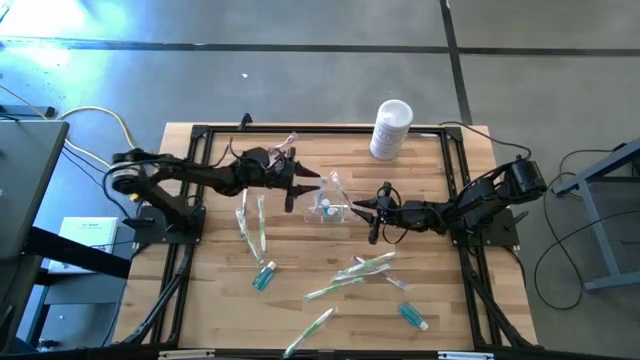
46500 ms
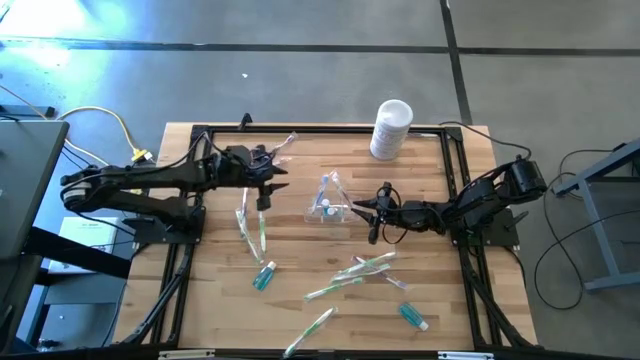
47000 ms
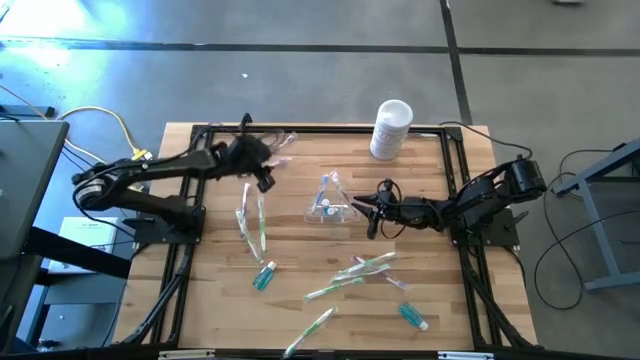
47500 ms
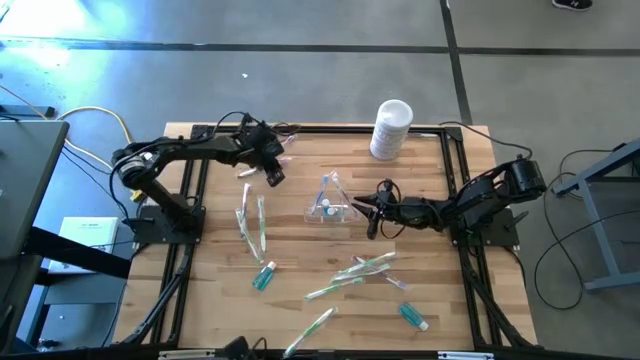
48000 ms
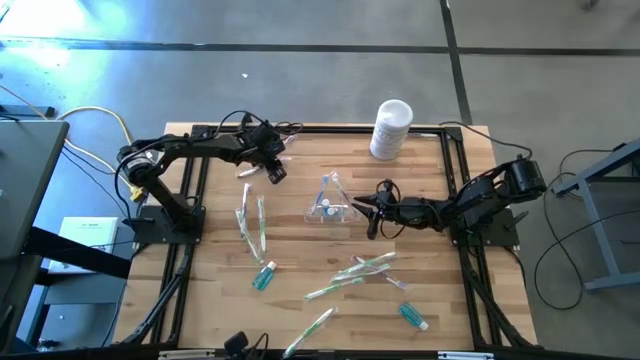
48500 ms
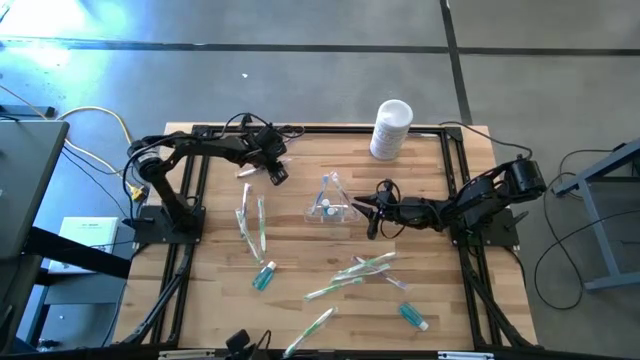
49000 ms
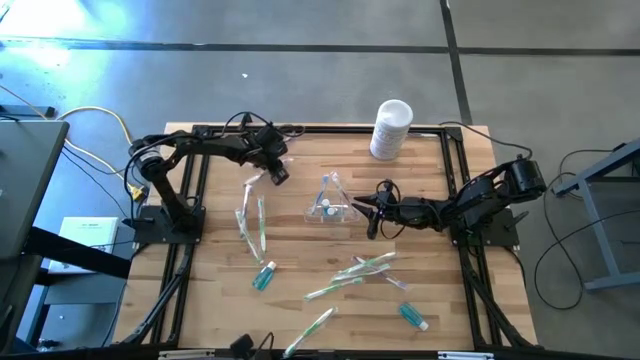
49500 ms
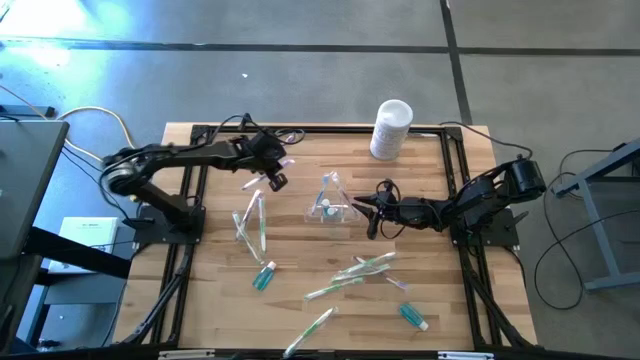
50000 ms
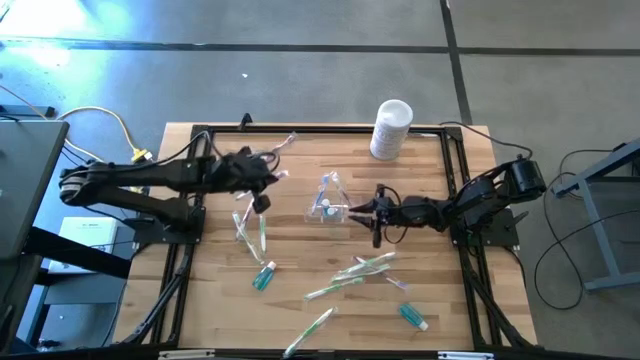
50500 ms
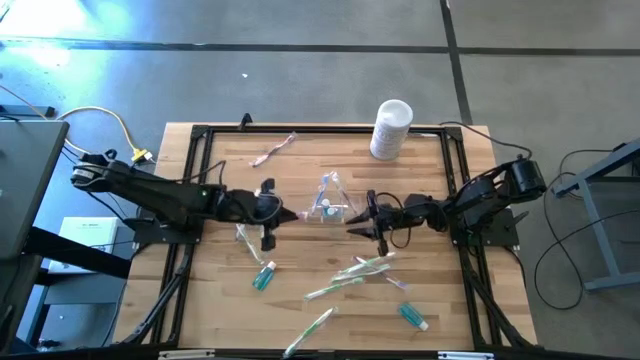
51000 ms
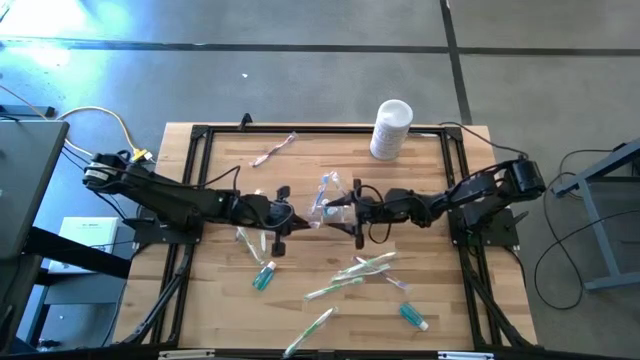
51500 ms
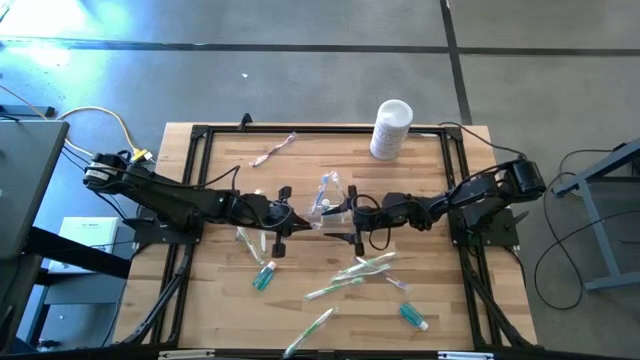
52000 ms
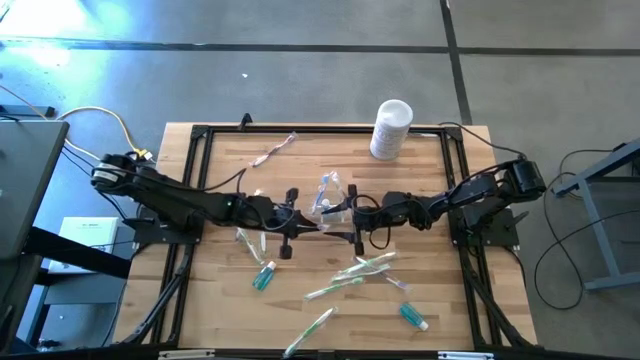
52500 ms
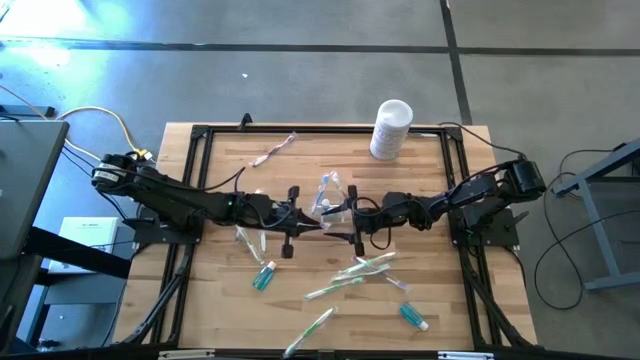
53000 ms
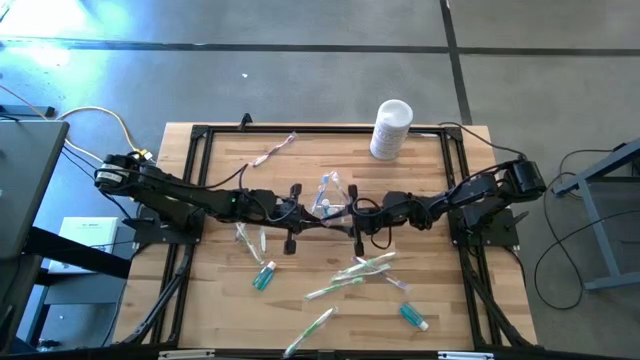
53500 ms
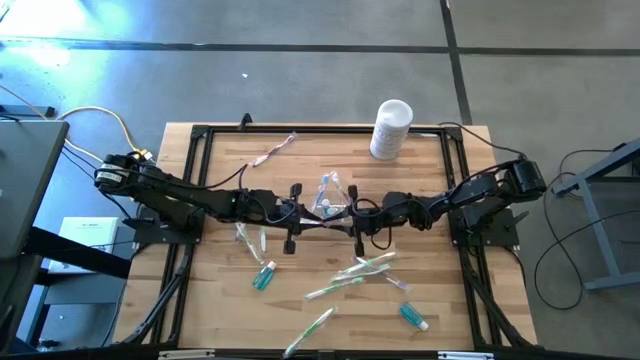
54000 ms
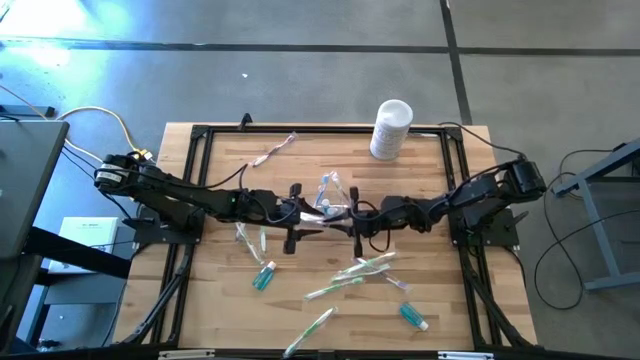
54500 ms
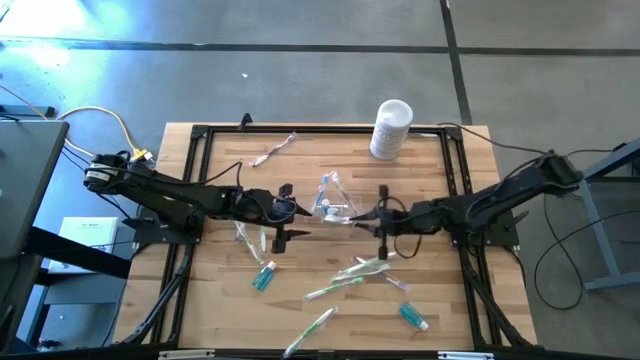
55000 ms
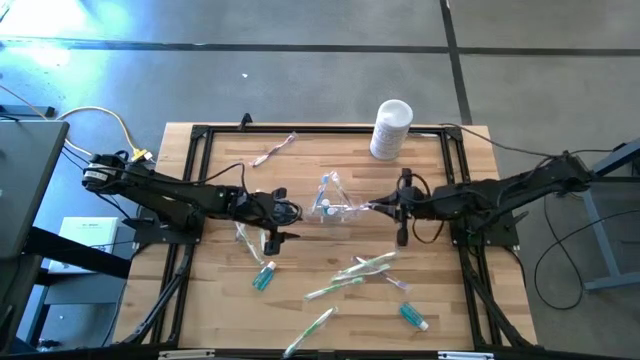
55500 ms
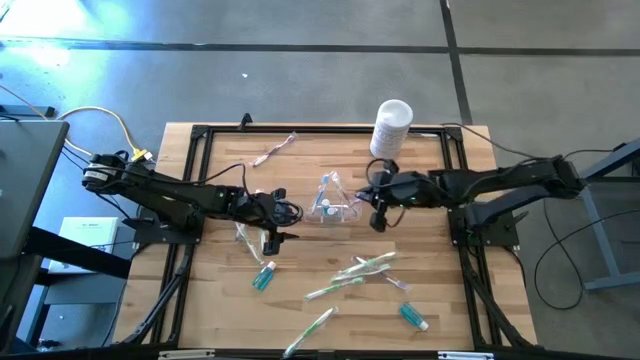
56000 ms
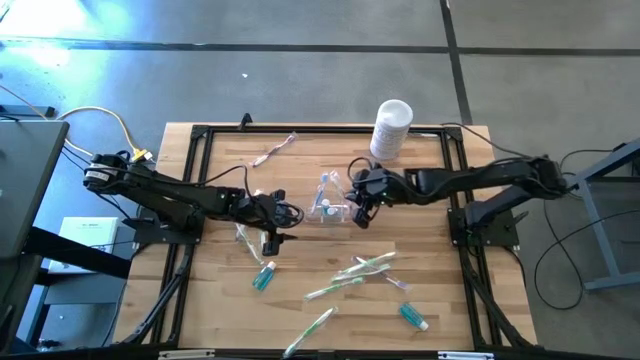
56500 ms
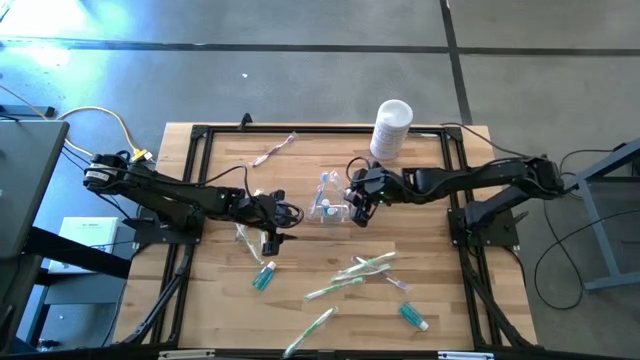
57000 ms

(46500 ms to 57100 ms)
Task: Pick & Place toothbrushing station
Put the violet toothbrush into the transparent organizer

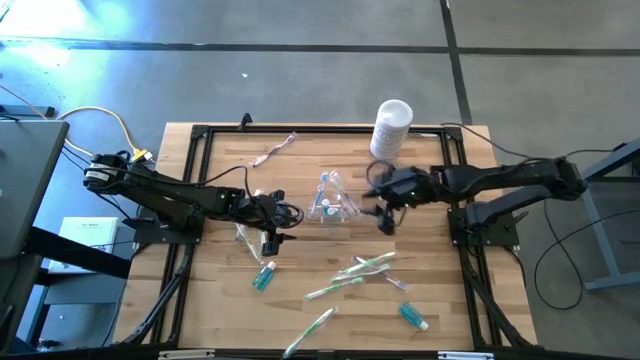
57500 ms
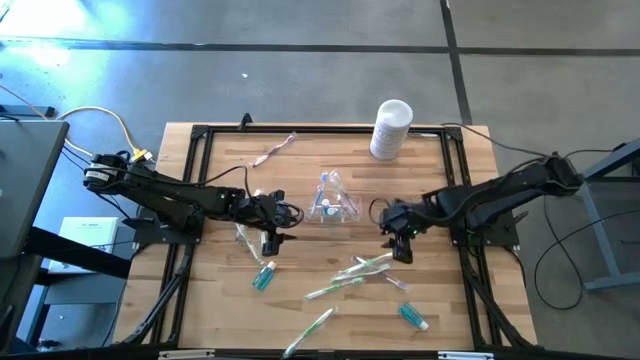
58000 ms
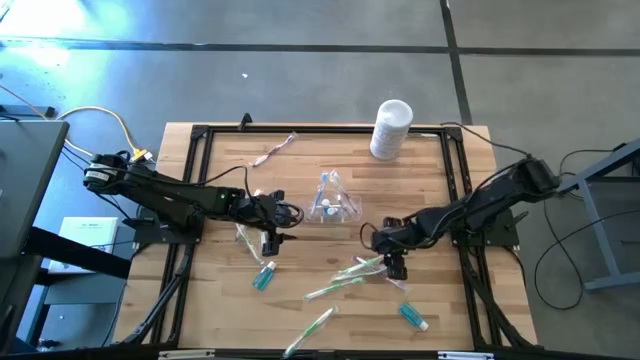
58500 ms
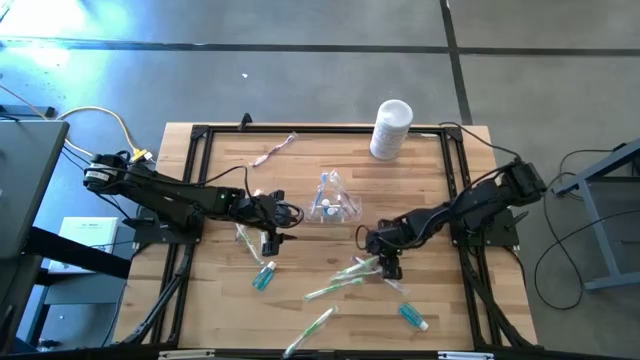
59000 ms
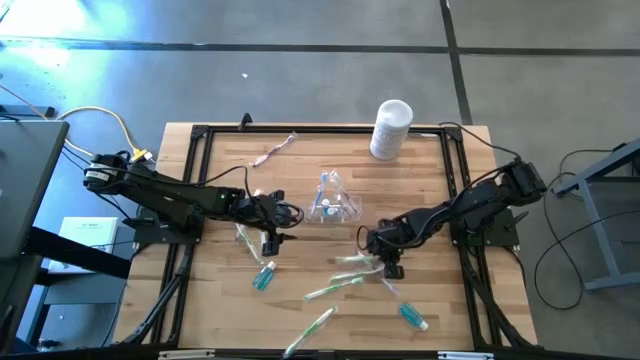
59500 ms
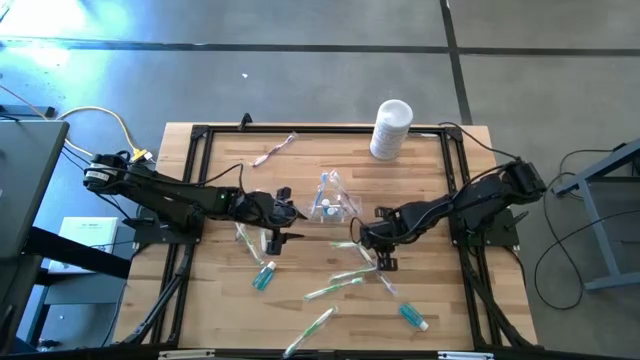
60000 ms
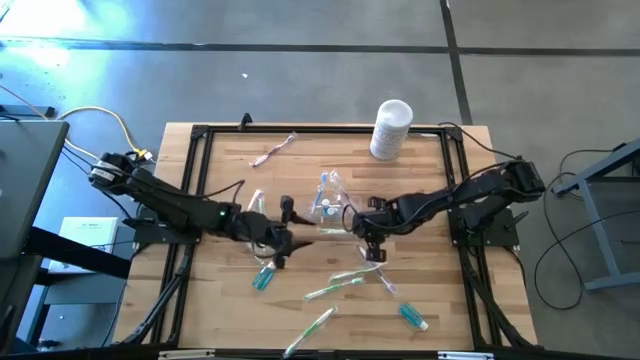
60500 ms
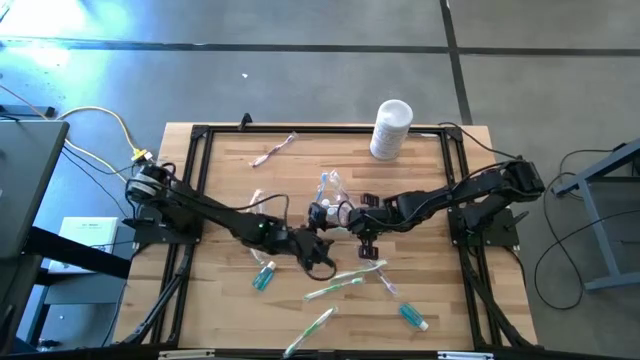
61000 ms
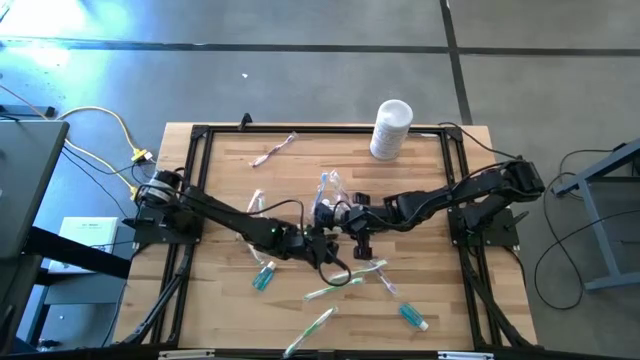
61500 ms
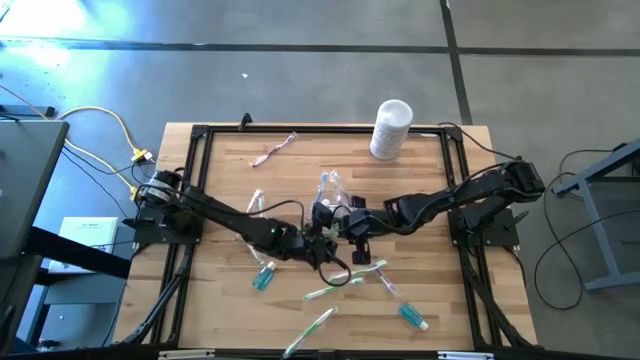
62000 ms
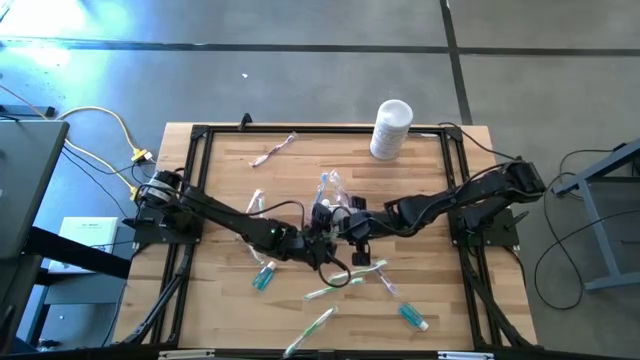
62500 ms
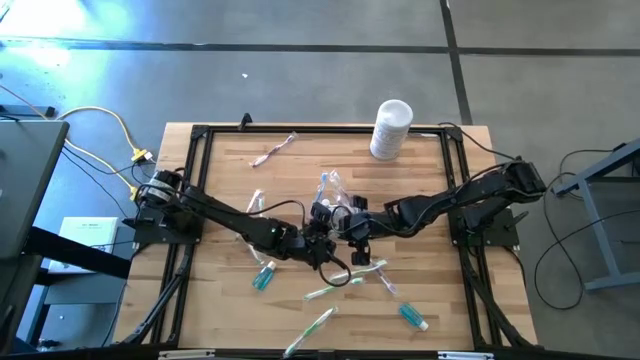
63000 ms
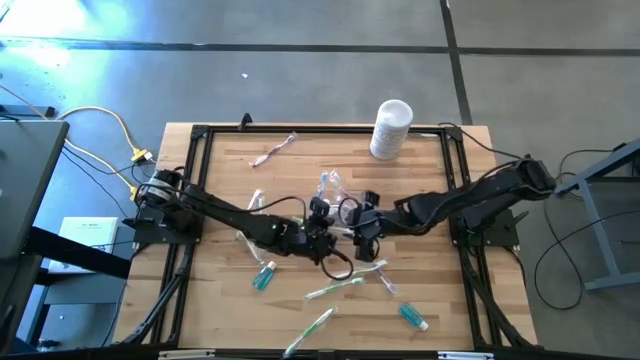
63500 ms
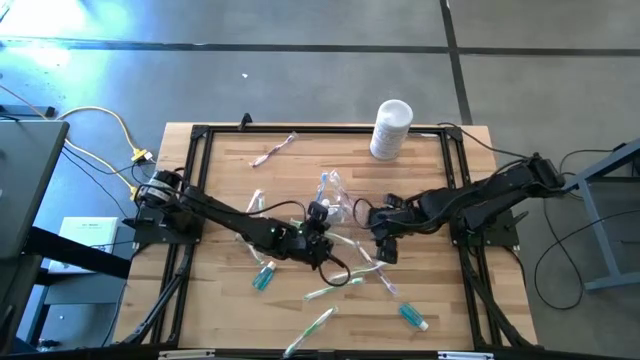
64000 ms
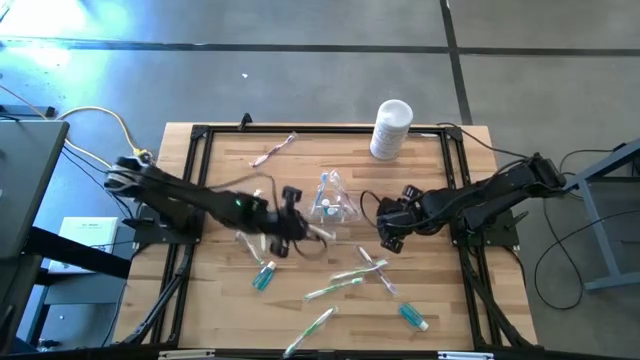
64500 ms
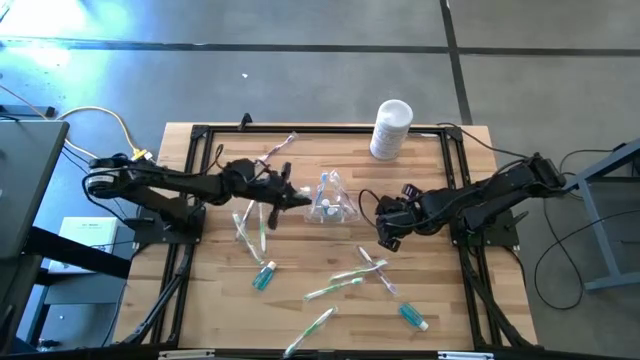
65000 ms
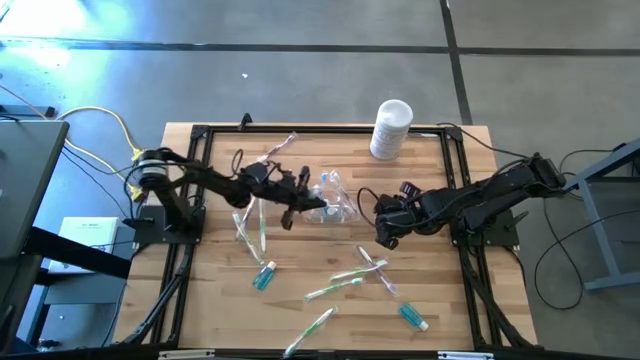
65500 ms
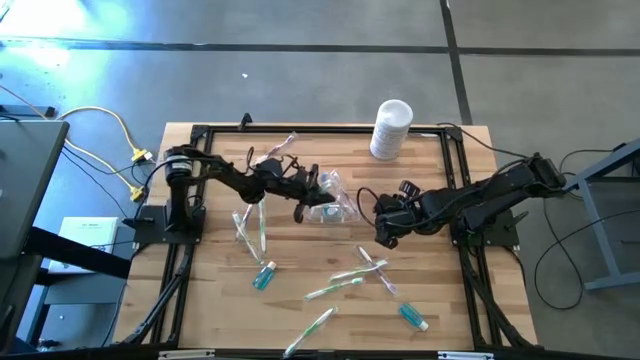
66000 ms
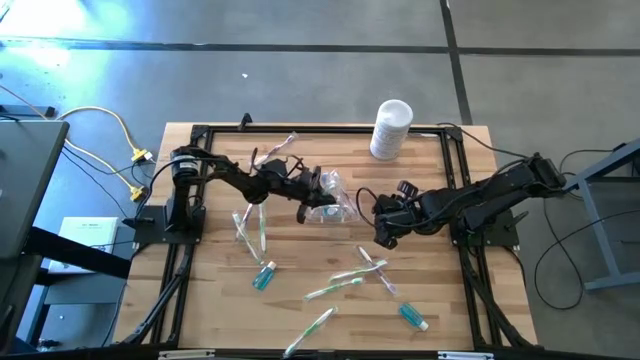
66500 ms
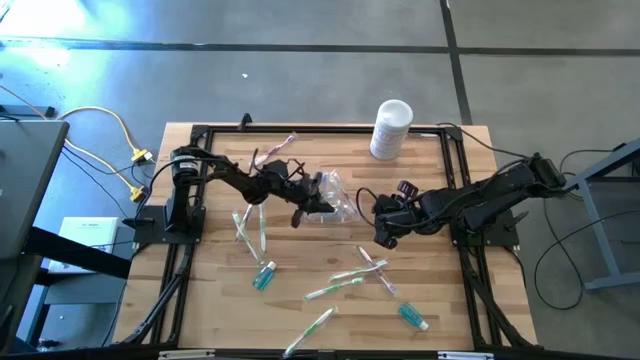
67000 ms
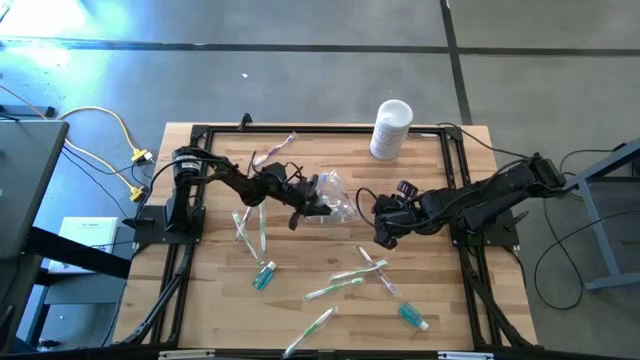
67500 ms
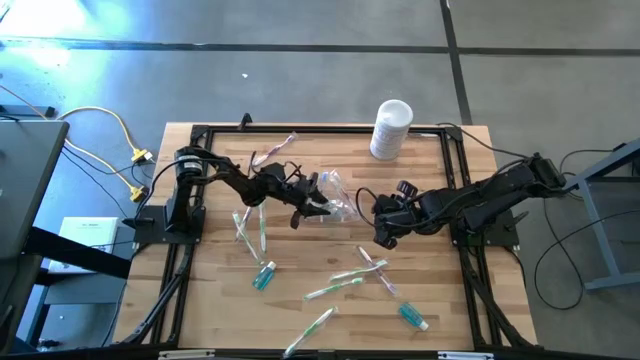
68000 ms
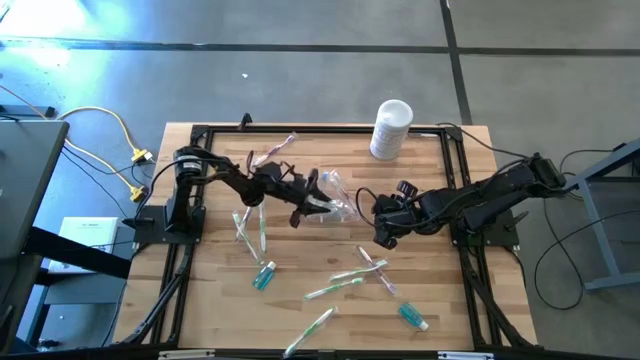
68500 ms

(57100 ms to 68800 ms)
Put the green toothbrush into the transparent organizer
